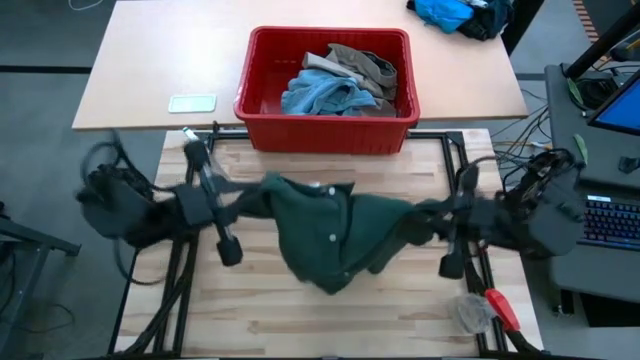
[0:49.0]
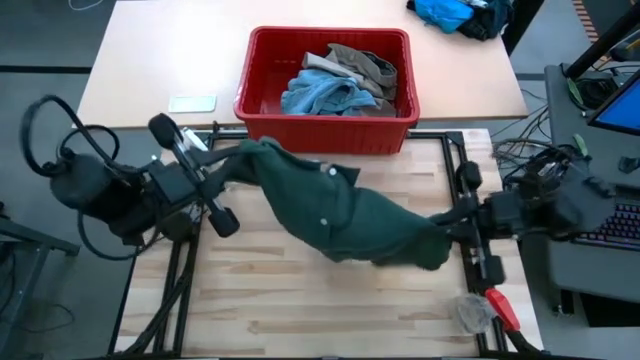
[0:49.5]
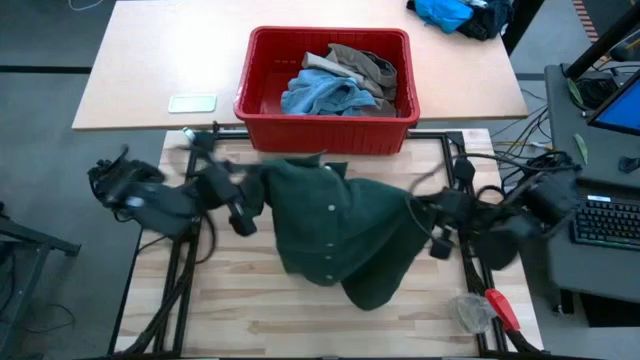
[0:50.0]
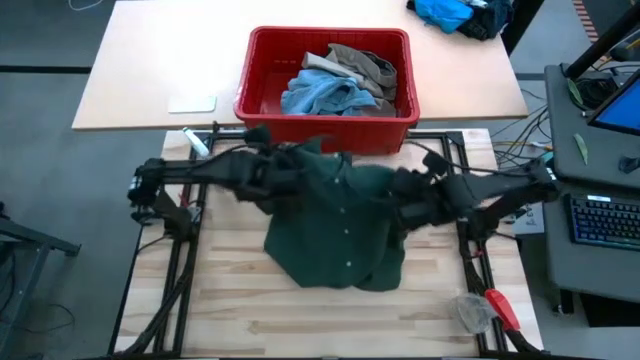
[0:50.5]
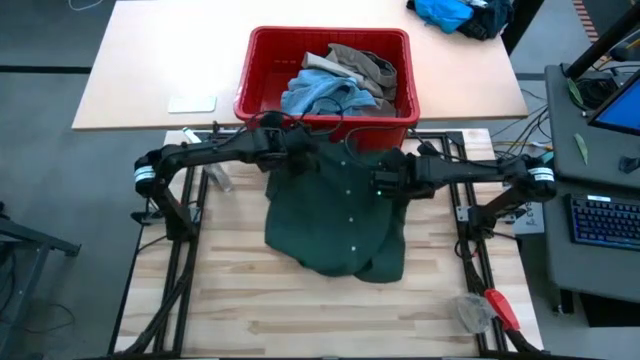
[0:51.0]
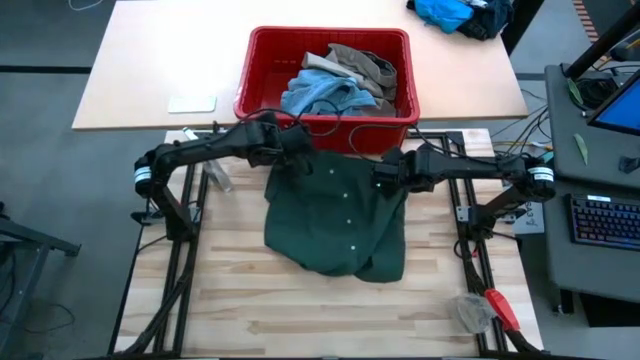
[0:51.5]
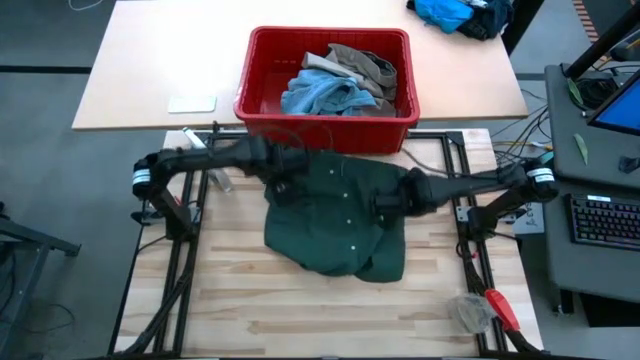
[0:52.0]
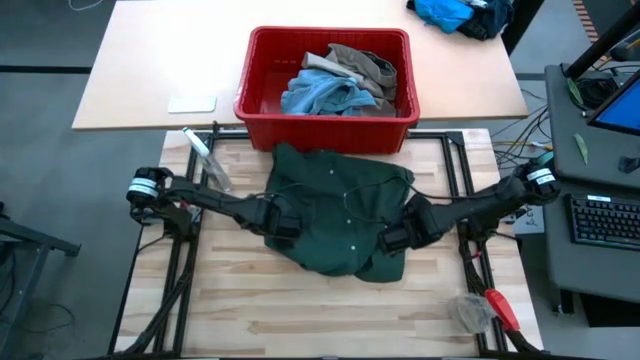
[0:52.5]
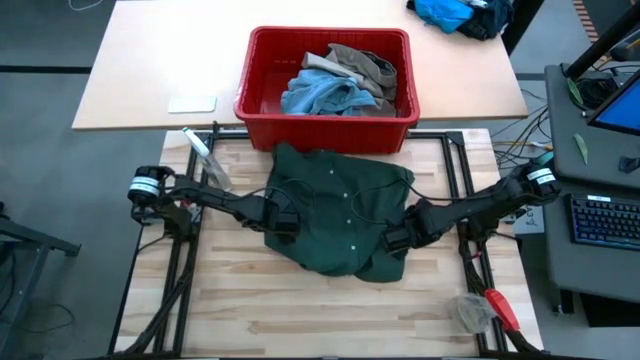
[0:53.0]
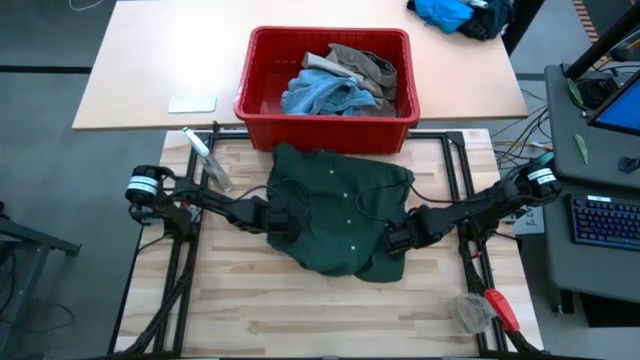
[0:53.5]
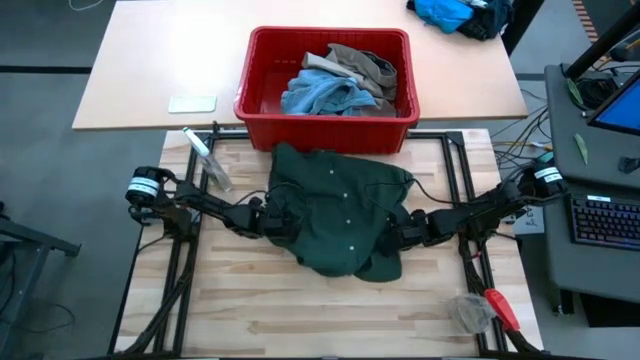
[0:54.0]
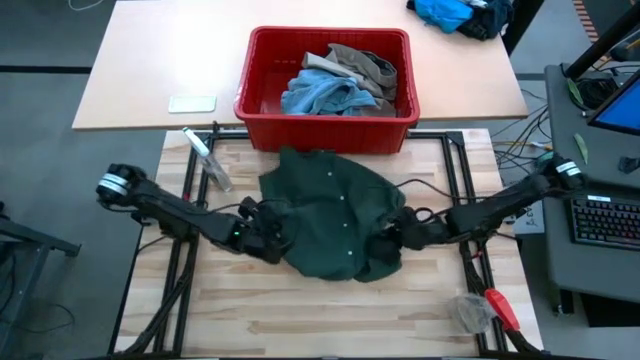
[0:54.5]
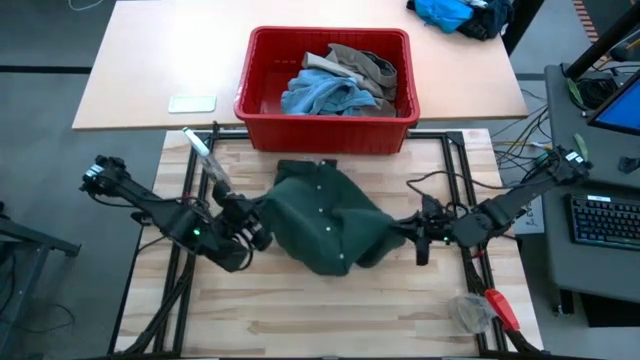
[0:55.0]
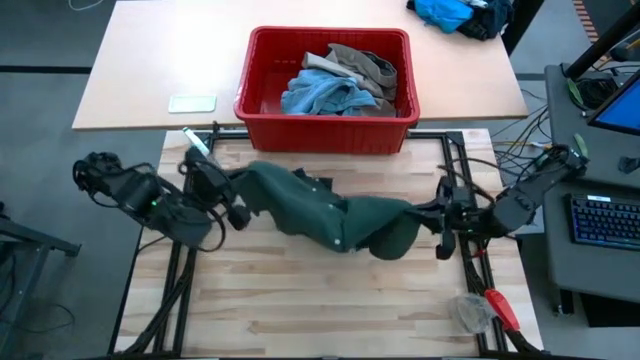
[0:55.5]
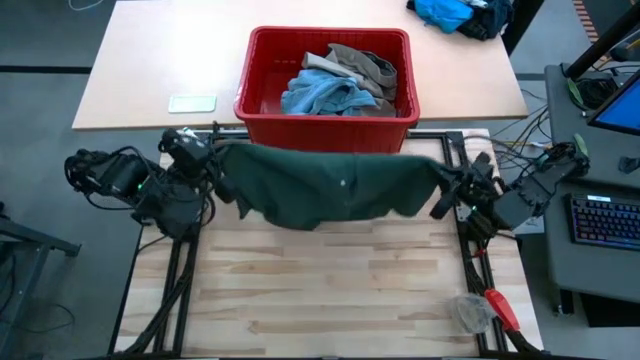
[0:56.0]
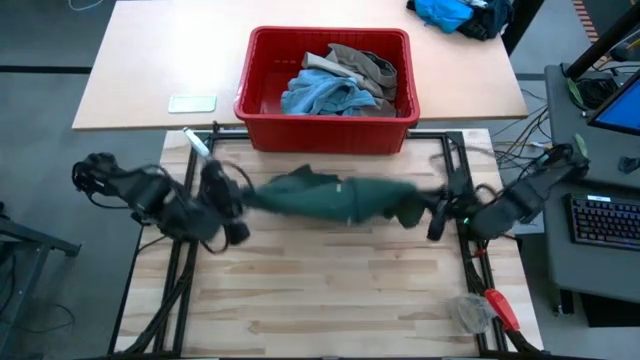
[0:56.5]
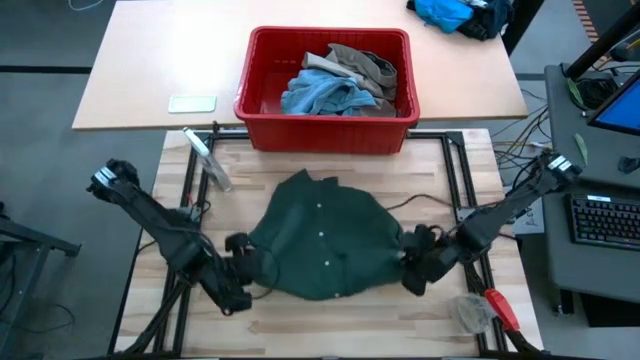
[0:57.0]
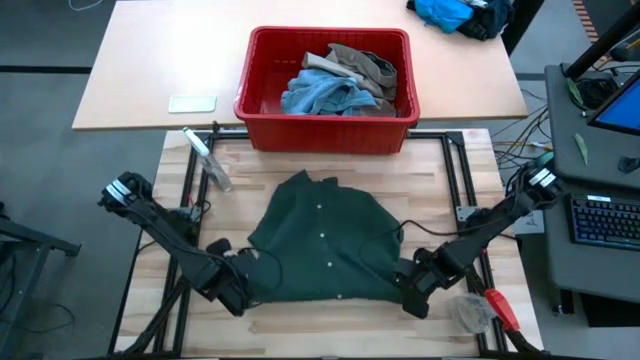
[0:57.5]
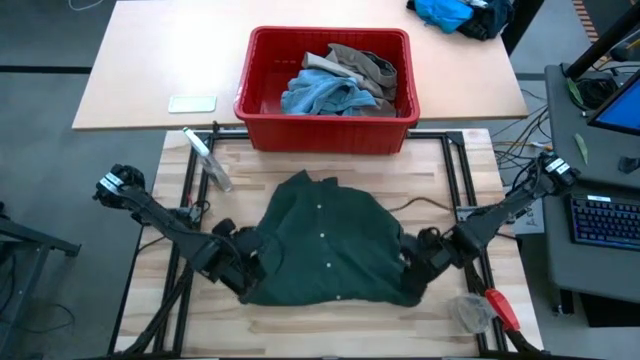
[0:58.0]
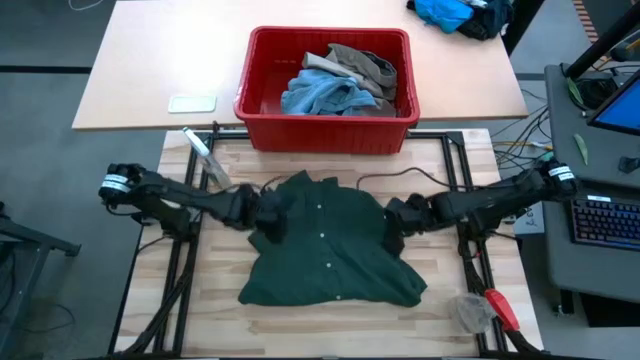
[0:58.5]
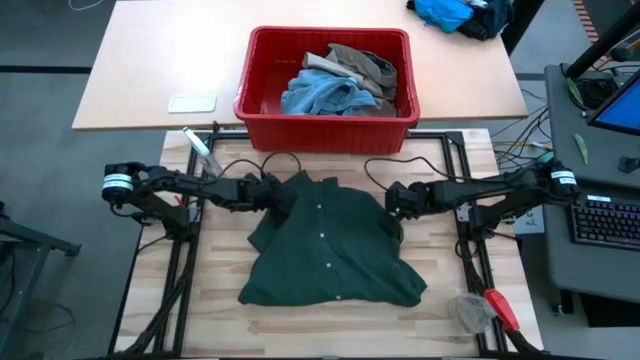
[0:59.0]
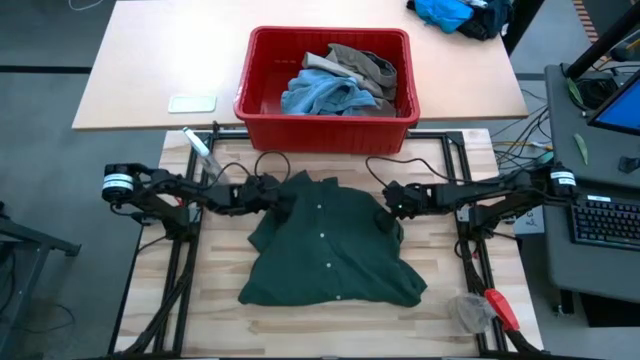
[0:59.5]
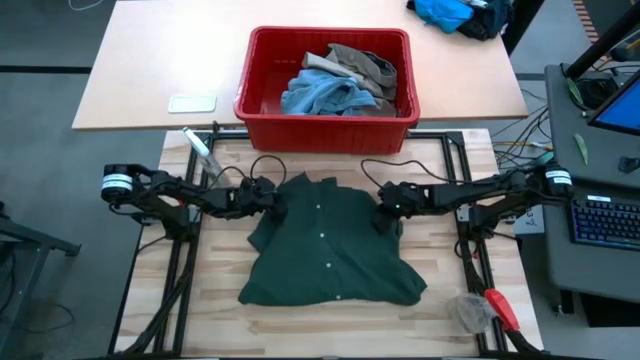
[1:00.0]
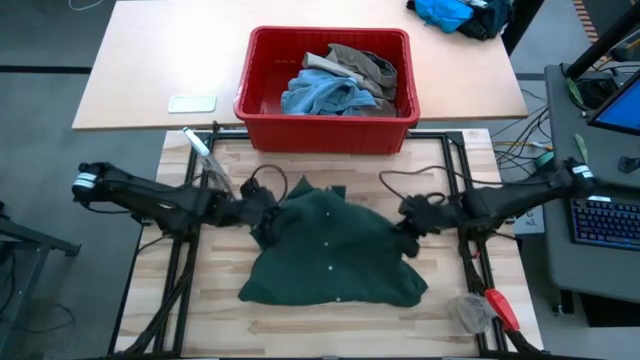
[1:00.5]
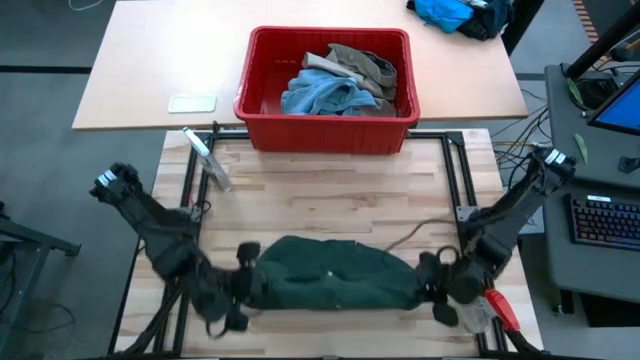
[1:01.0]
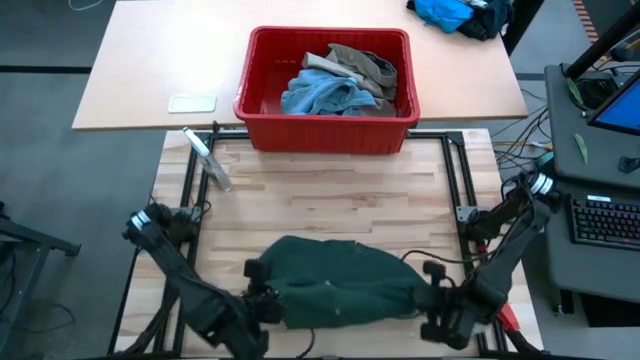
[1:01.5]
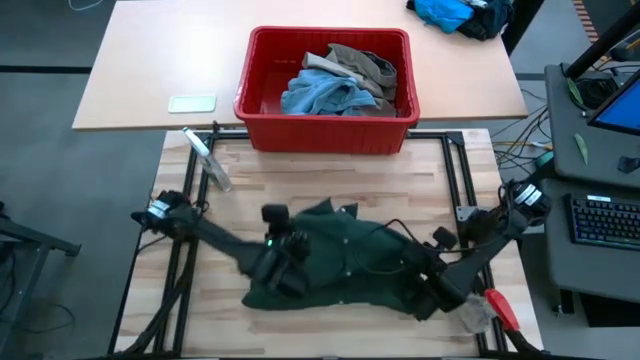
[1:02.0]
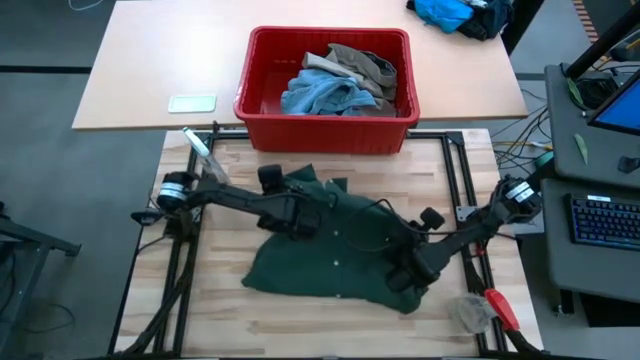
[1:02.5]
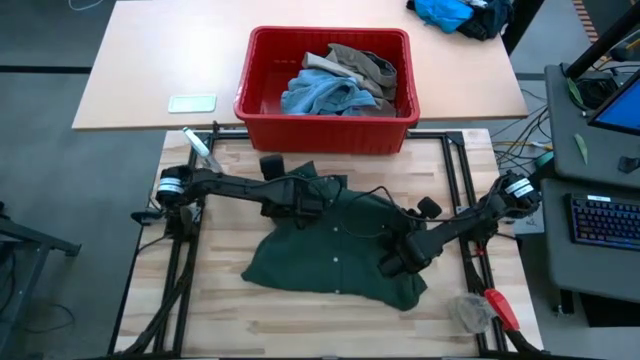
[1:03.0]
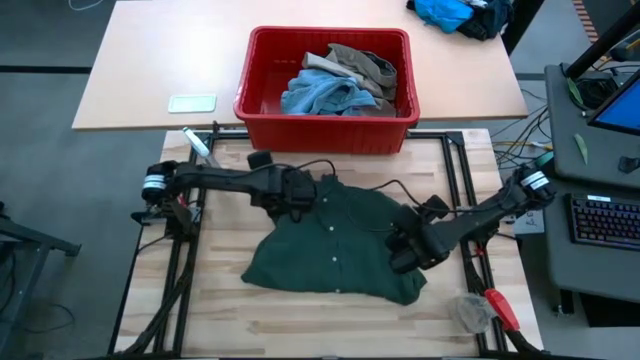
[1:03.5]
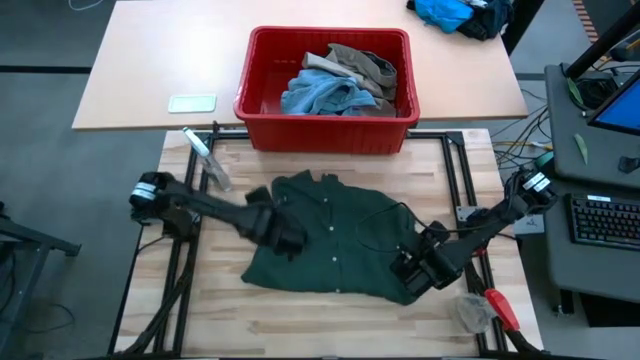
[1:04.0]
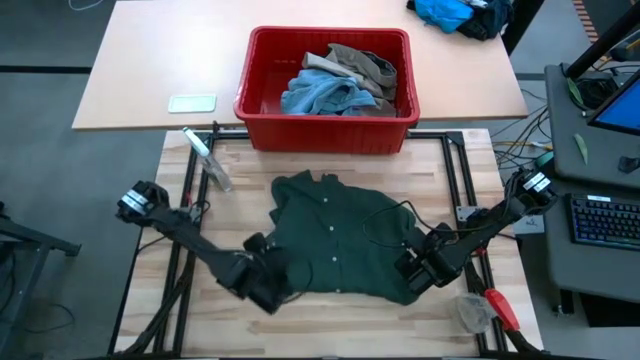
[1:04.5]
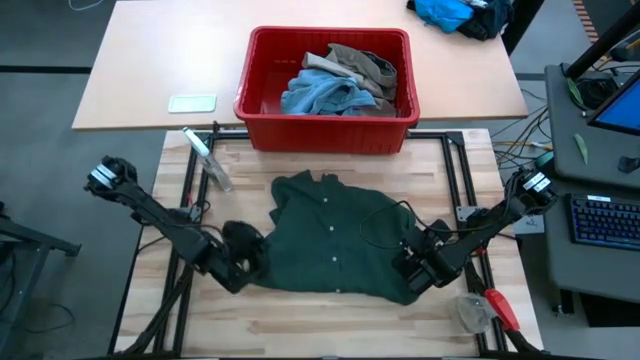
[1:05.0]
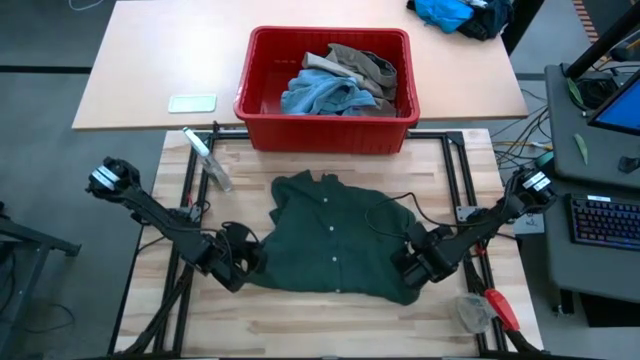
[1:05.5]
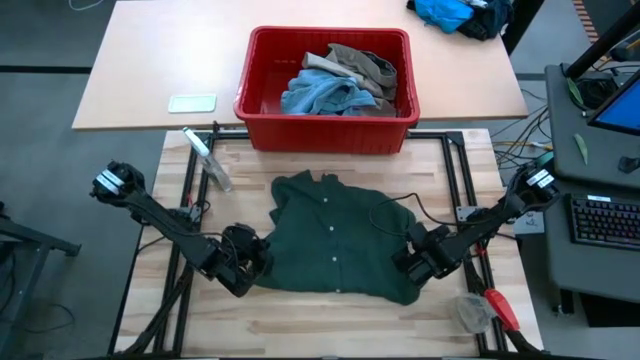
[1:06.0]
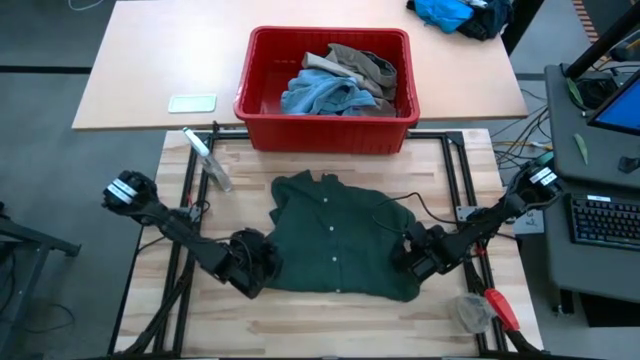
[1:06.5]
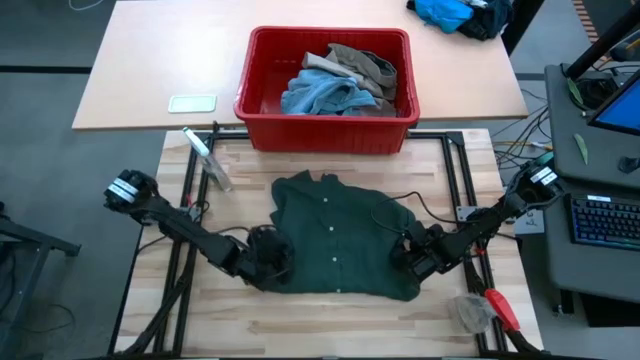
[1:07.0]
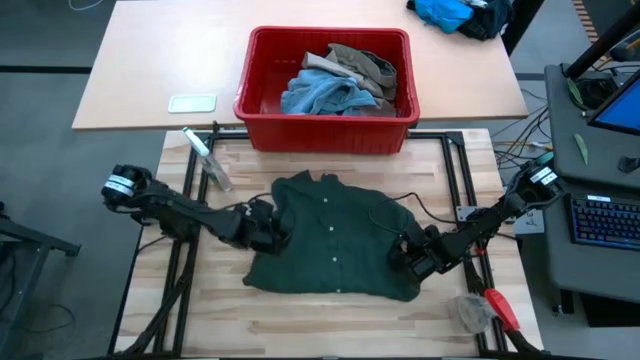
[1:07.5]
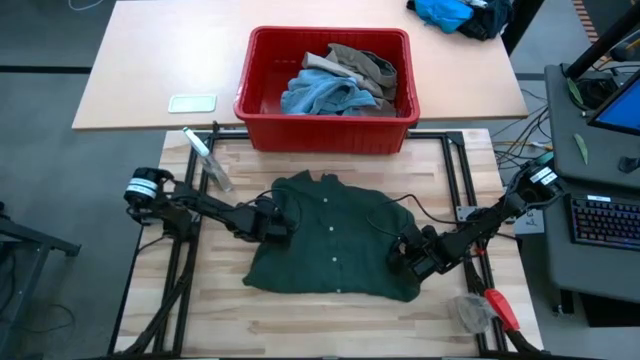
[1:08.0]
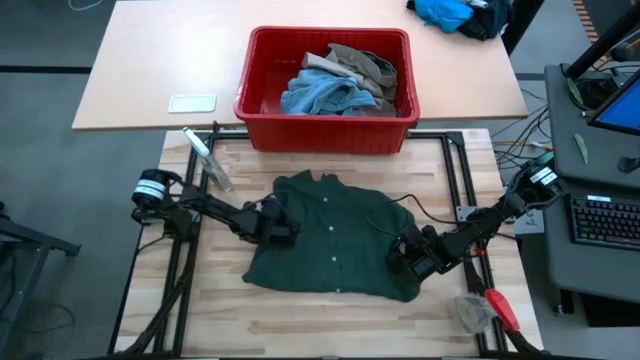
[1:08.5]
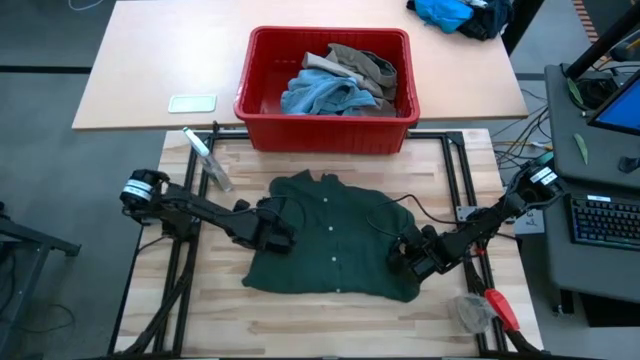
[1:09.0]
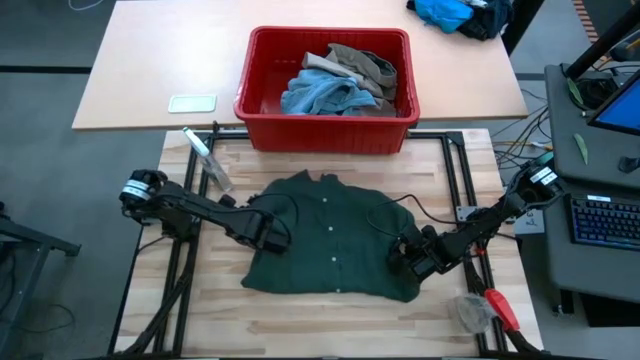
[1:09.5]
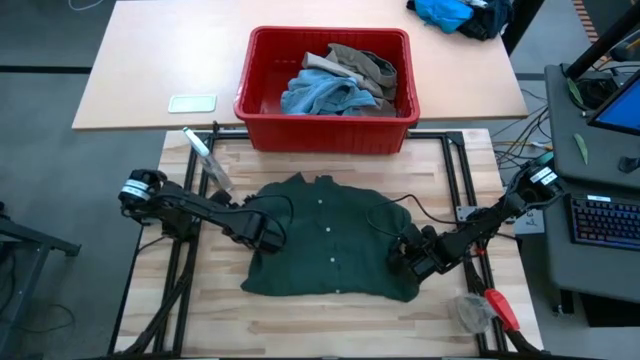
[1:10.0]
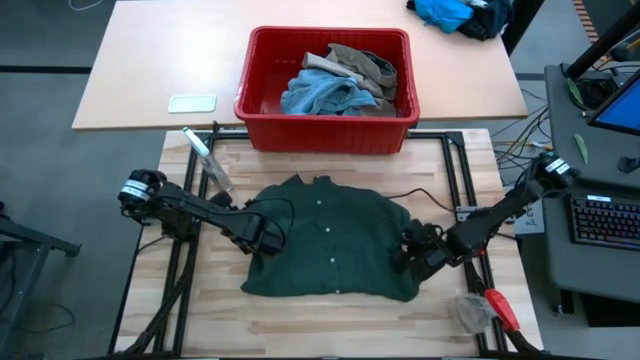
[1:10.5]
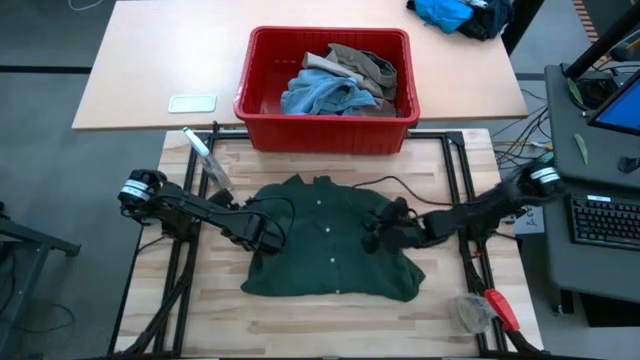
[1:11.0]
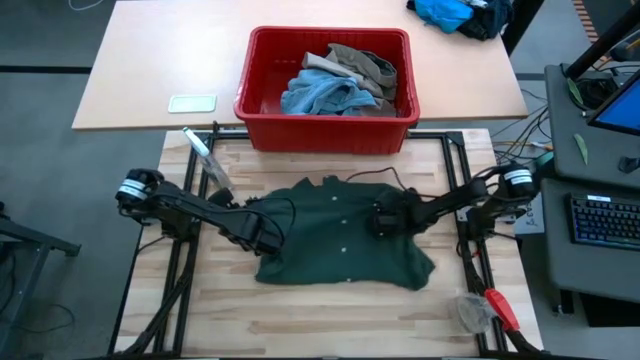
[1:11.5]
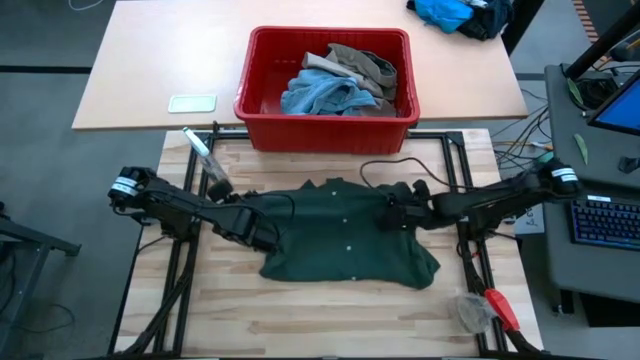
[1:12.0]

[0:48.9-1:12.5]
Task: Fold Laundry from Bin
Fold the green polo shirt
